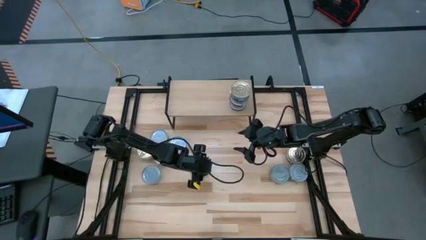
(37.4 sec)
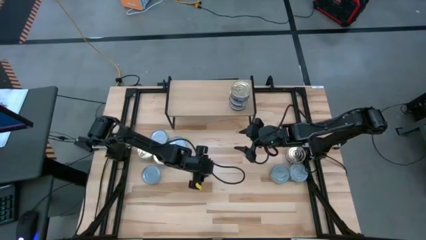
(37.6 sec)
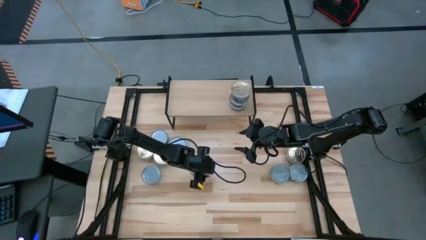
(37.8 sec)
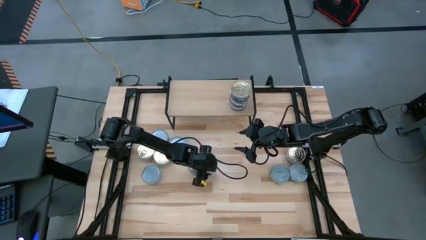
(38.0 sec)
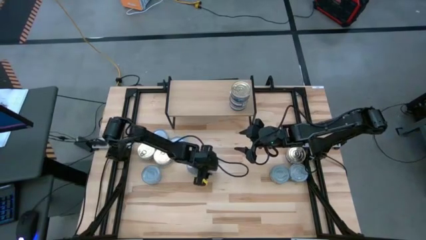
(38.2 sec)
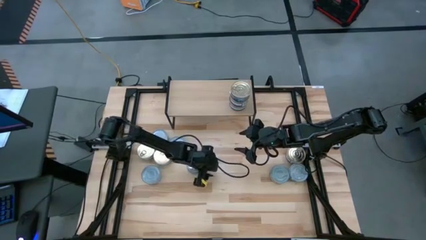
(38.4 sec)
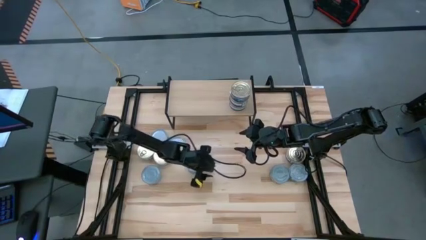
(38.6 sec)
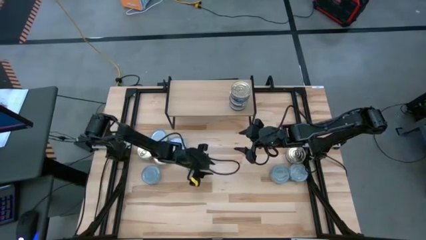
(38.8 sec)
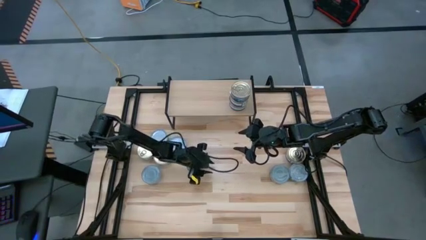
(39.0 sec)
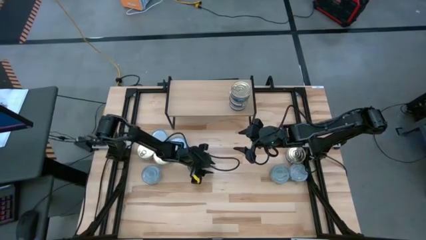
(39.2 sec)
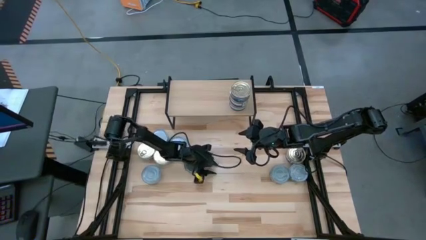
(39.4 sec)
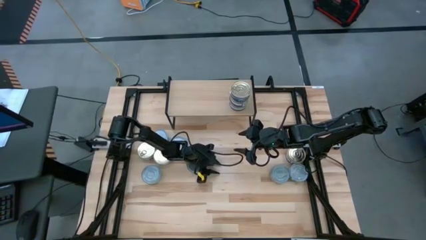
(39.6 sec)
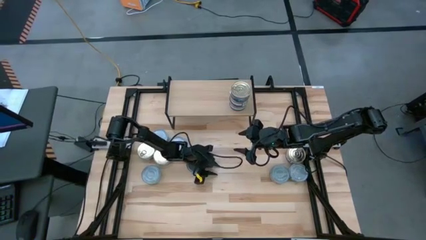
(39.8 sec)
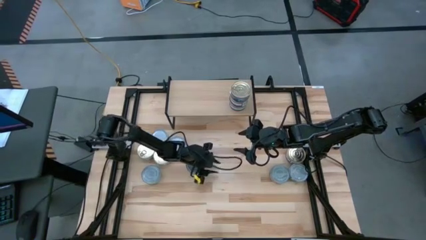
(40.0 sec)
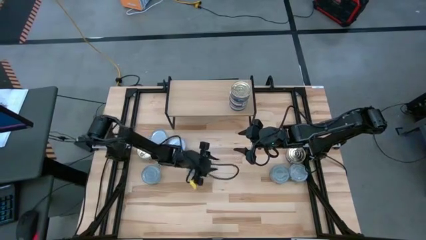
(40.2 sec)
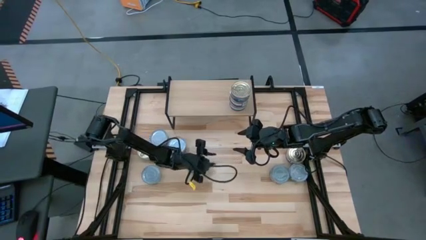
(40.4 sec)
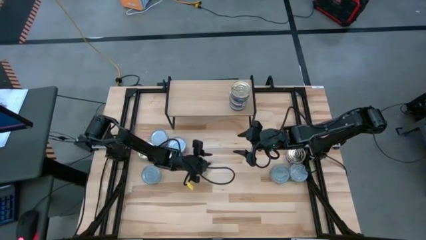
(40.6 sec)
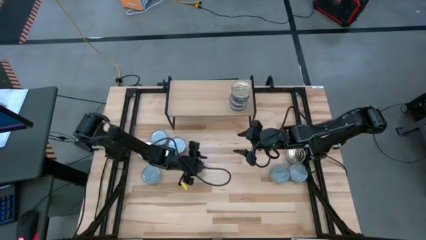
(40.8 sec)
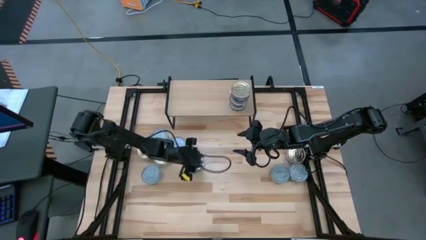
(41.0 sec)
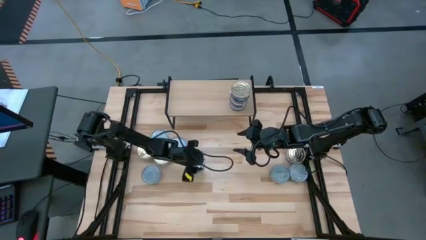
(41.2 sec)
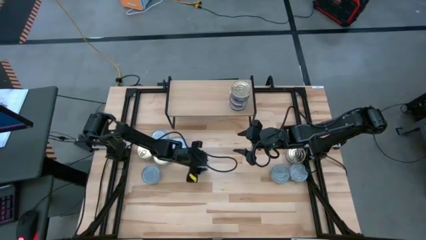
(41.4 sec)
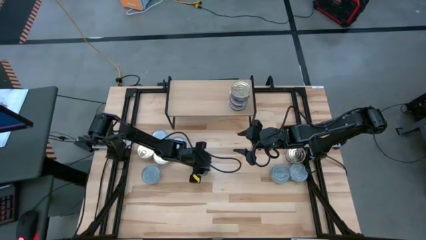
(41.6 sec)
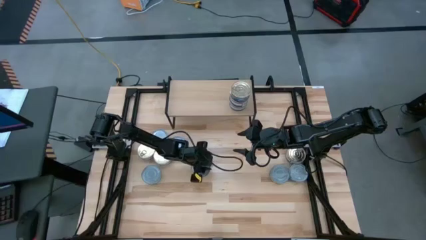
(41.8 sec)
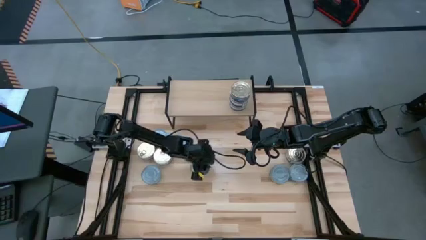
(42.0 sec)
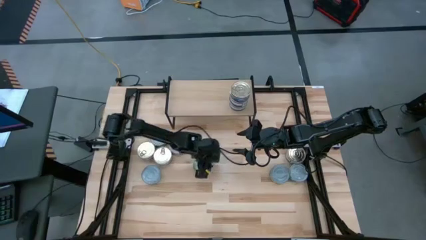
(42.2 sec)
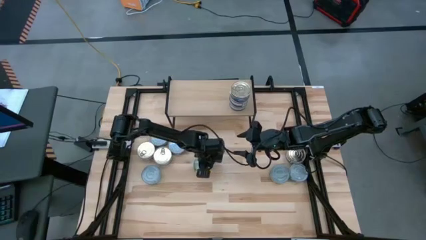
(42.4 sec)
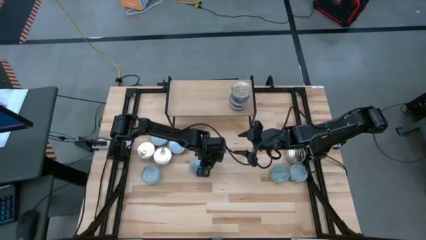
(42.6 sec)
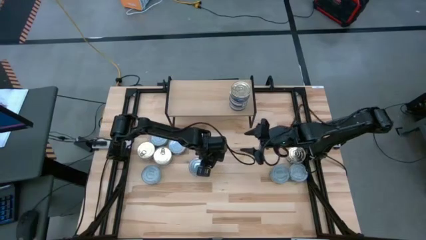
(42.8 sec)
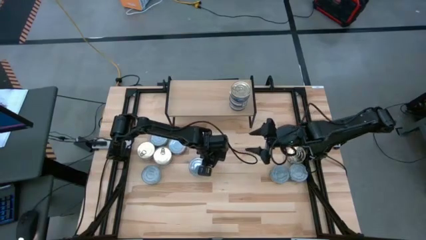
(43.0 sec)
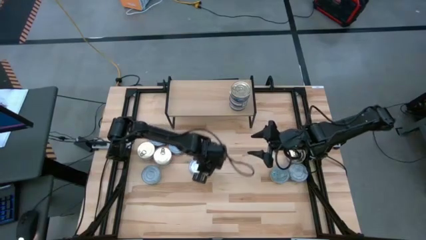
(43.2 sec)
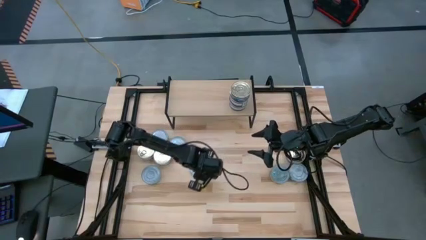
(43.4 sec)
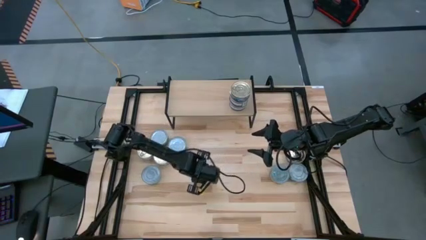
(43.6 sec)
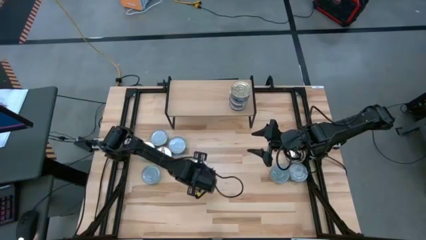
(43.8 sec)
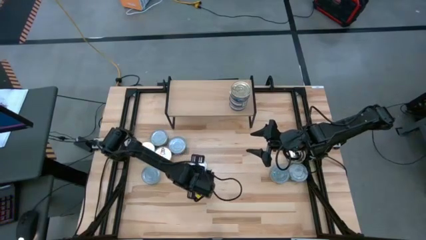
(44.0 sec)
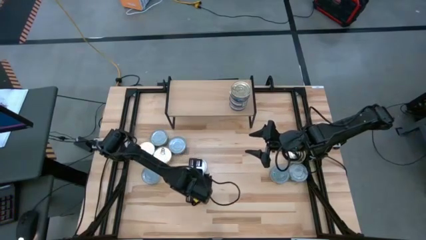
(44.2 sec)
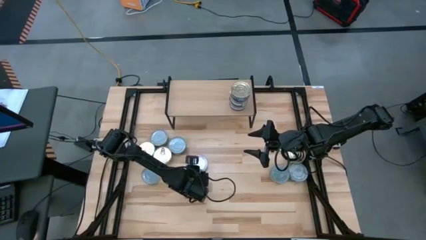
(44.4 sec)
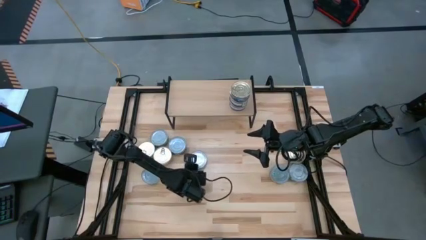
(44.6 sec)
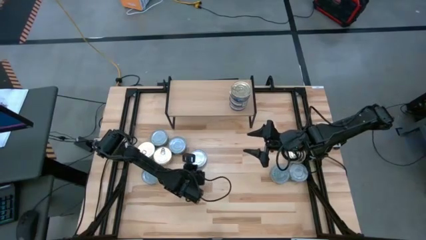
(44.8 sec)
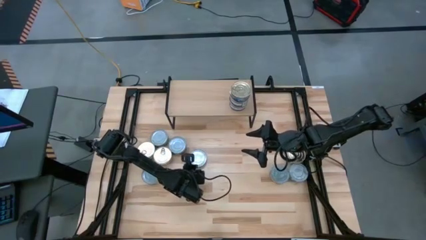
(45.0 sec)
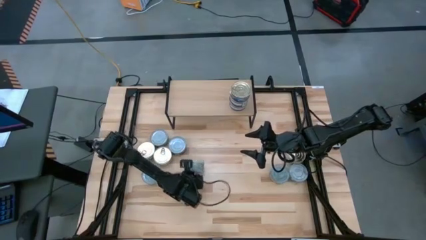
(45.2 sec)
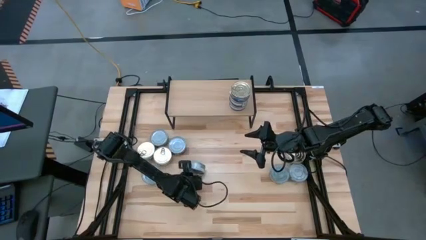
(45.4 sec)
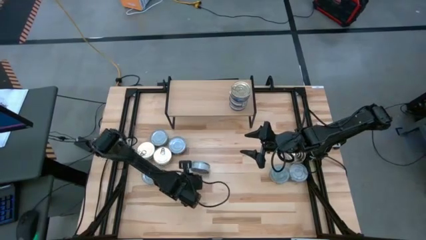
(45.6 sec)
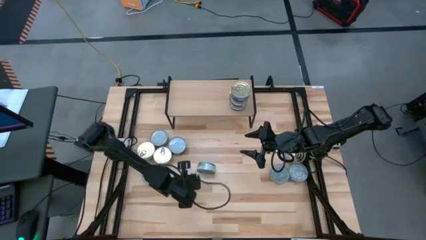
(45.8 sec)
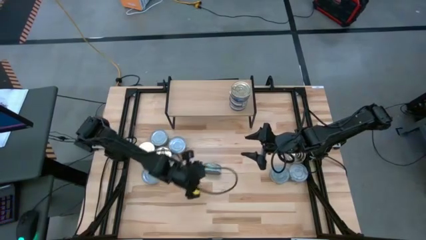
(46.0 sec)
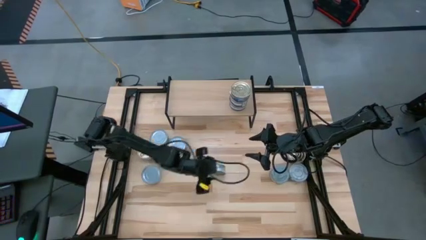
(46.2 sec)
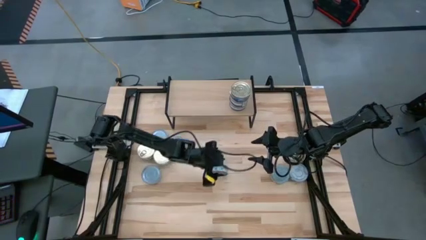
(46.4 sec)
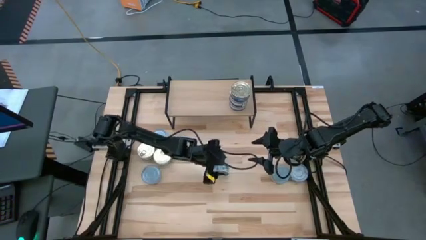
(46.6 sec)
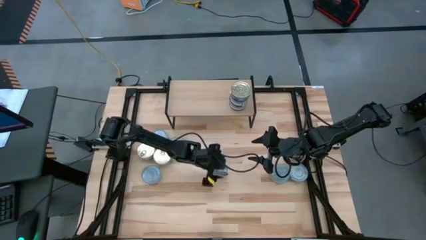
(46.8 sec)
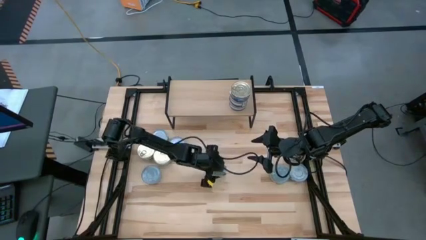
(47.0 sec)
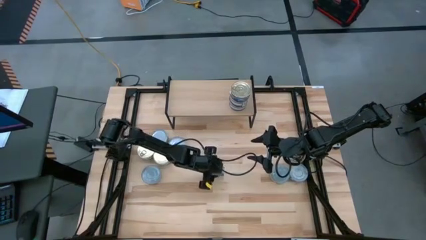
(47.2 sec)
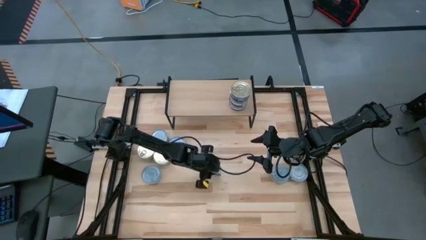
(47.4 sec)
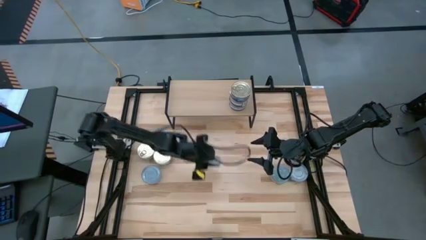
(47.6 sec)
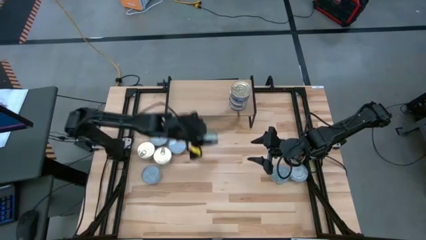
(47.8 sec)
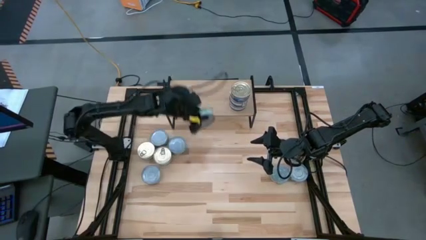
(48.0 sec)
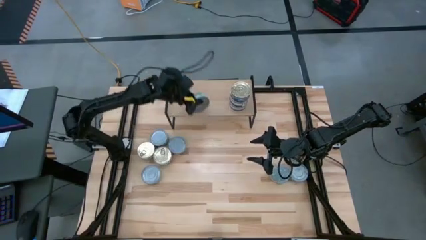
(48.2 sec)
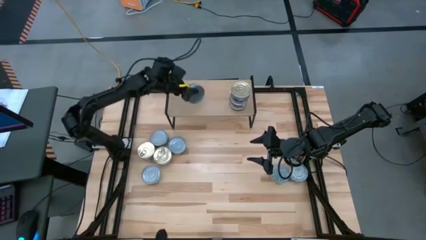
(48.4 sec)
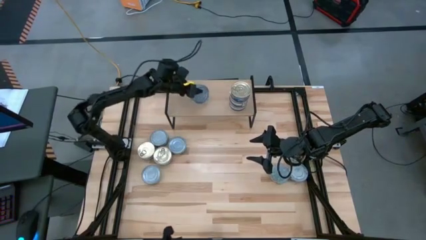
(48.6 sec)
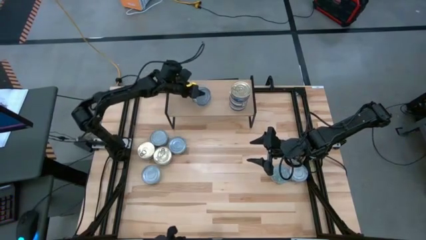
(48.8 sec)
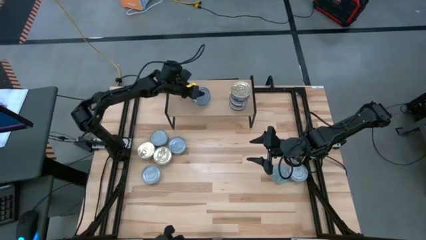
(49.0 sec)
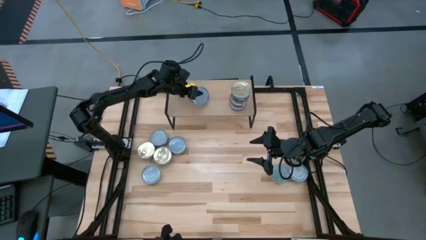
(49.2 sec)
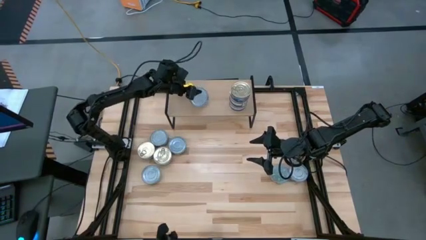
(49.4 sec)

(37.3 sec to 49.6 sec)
Task: Stack canned seafood by type on shelf
Put the green tuna can on the shelf

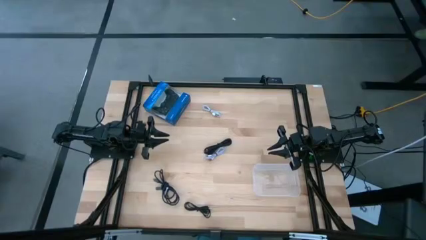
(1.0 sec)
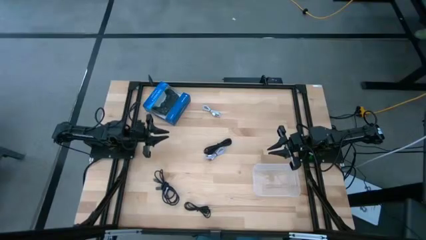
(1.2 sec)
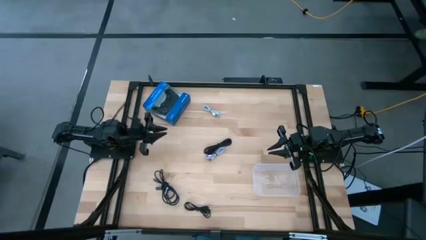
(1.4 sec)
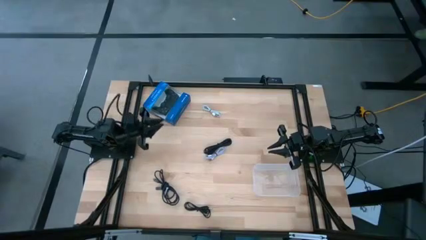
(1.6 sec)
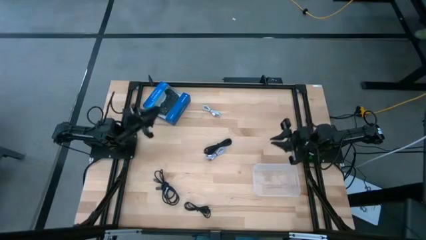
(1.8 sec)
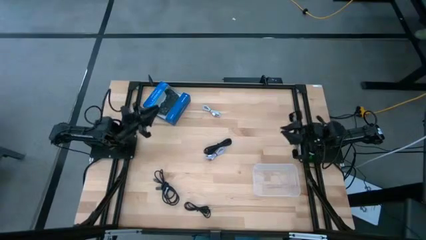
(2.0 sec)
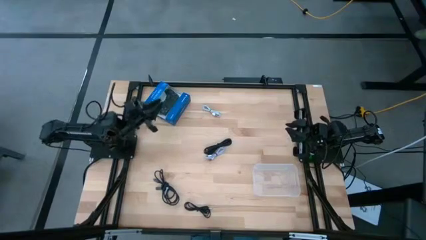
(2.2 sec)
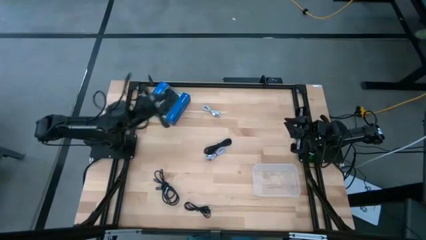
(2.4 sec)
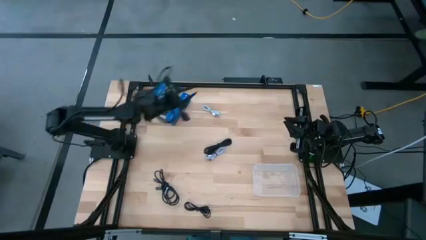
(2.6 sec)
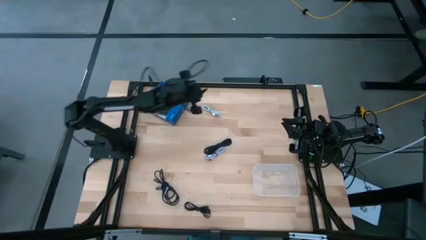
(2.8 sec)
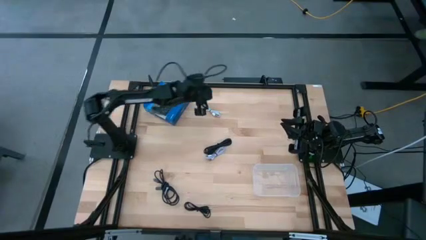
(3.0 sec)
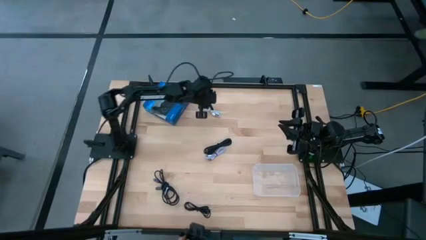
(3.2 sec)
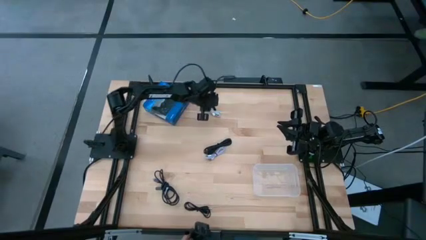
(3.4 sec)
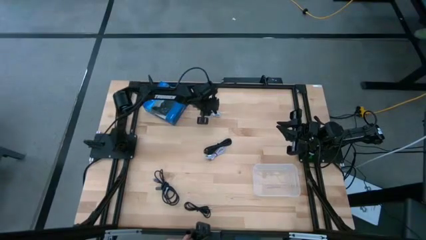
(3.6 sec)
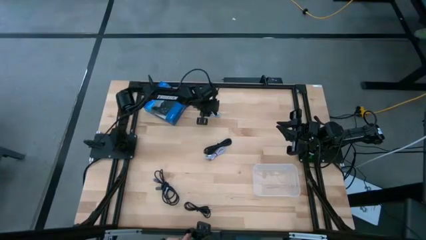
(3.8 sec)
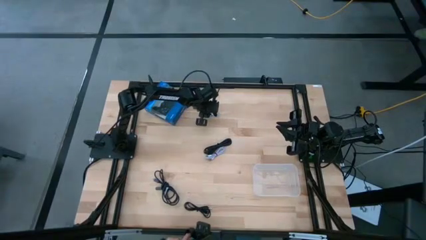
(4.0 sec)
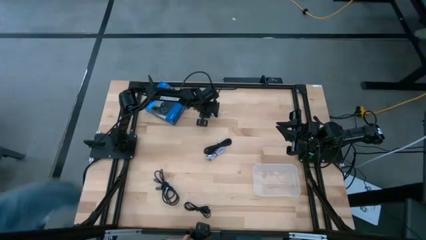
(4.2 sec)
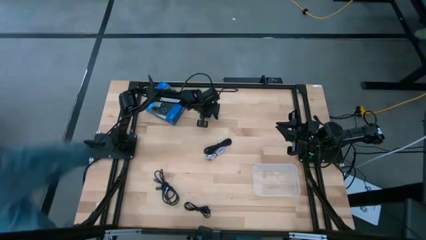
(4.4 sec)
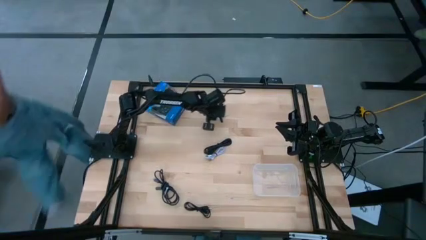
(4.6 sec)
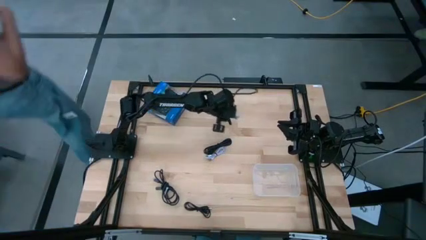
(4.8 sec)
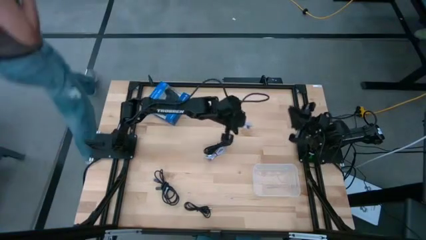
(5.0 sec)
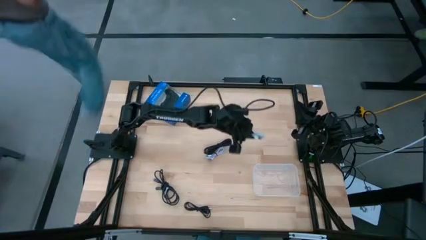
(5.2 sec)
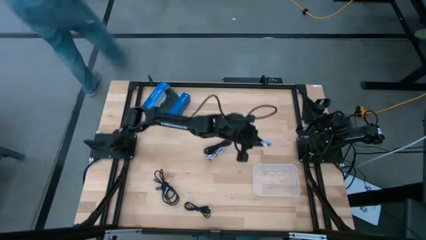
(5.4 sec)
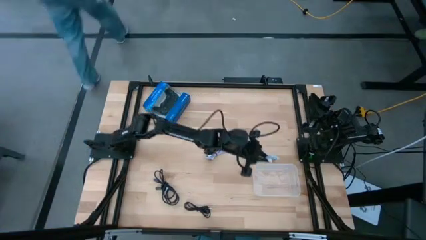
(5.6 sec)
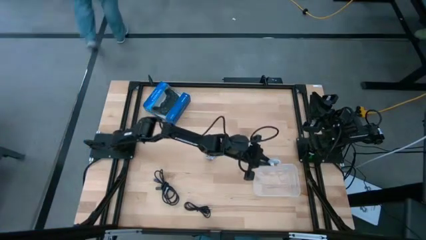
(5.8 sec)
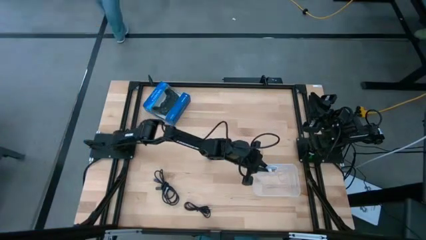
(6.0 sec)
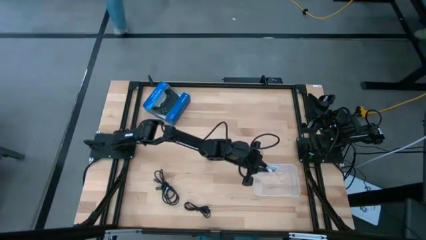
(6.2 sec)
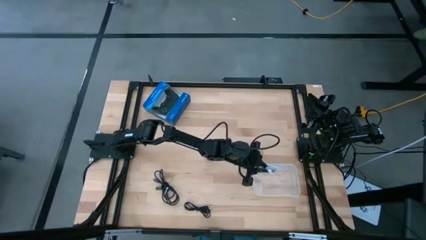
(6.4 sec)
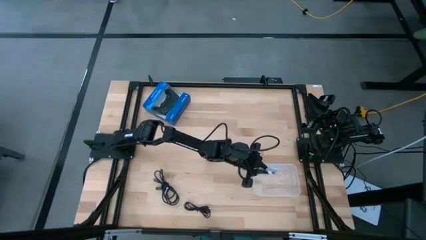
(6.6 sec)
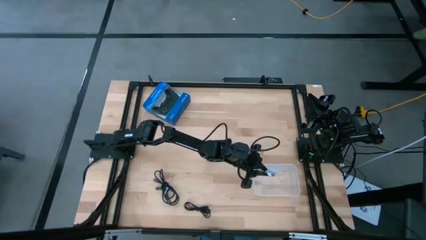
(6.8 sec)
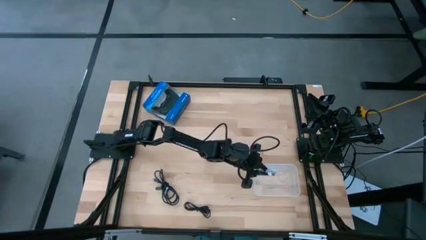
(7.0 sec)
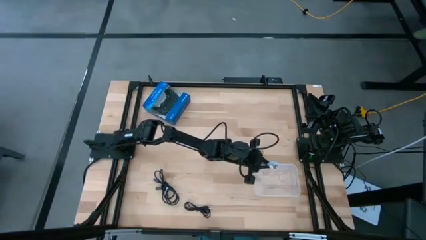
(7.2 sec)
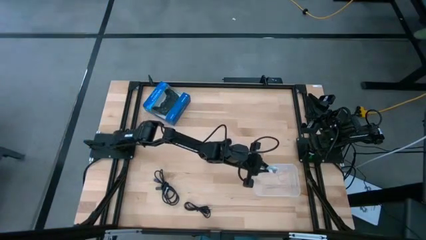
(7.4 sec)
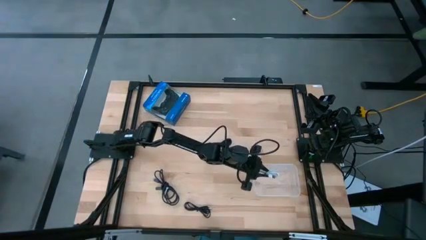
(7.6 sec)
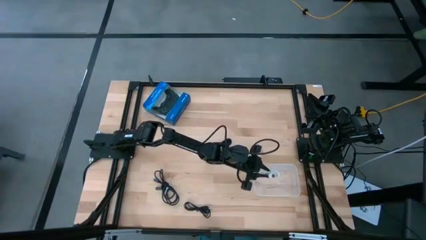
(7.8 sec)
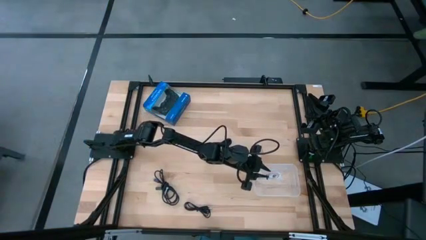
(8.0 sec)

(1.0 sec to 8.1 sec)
Task: Pick and place USB-C Cables
Put the top white charger cable into the transparent container
